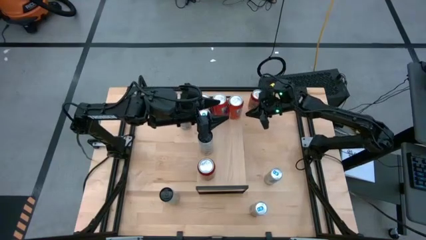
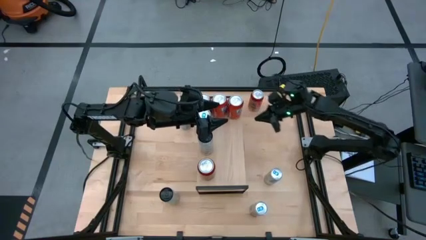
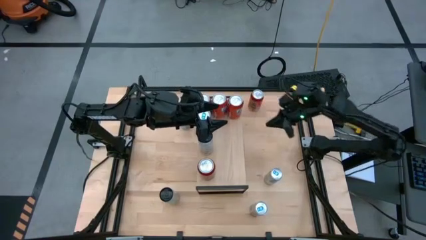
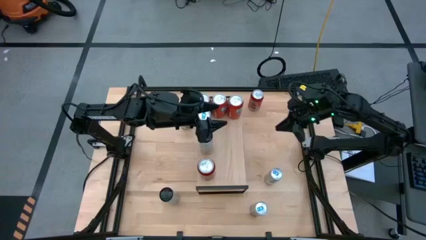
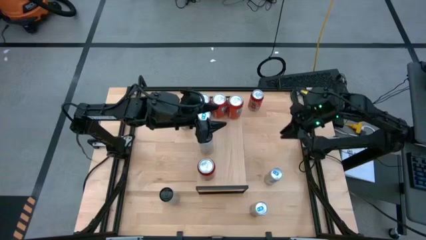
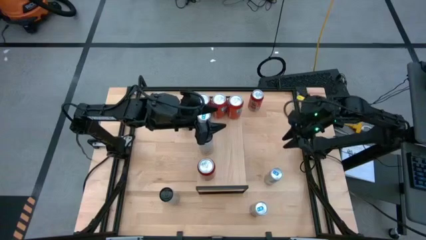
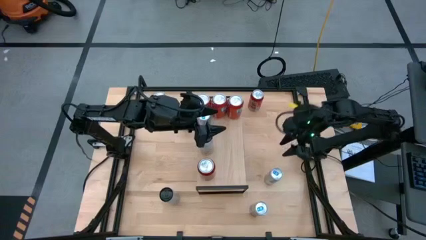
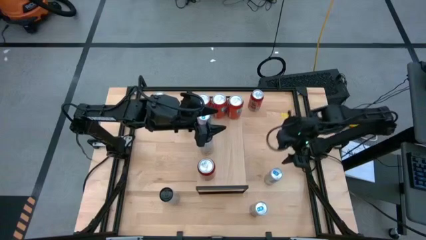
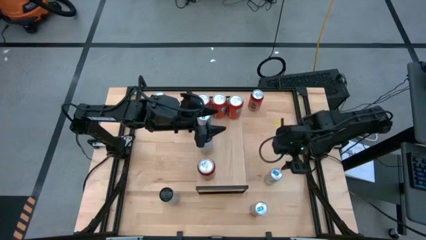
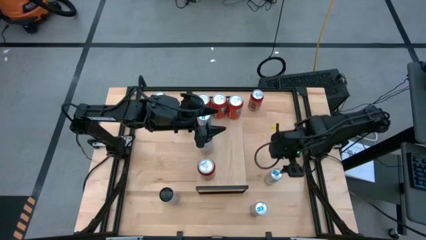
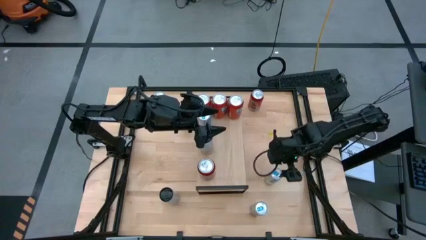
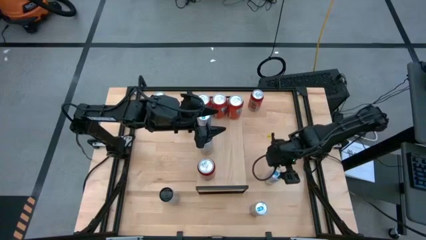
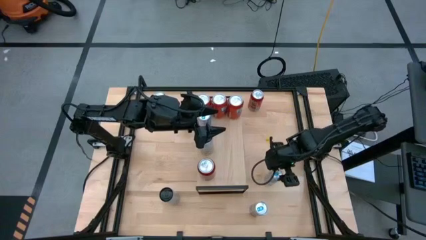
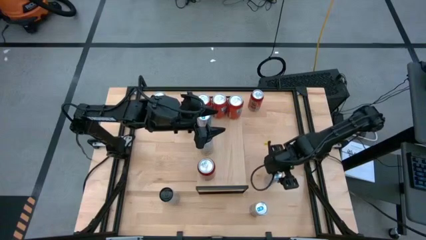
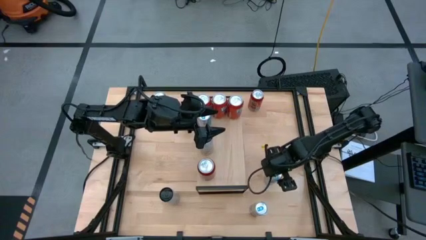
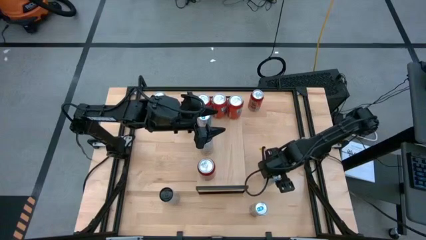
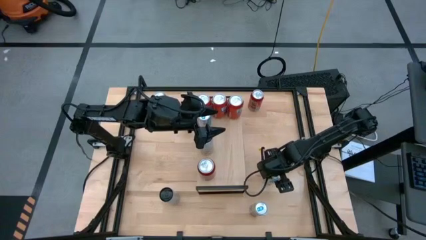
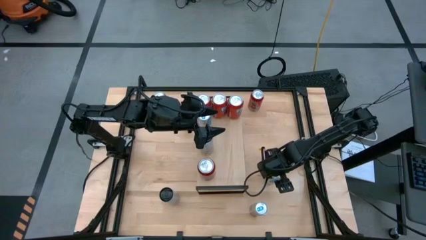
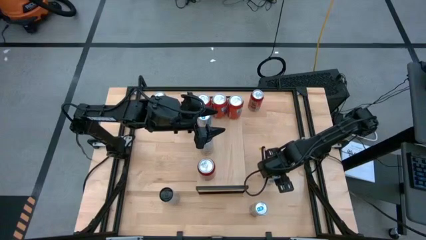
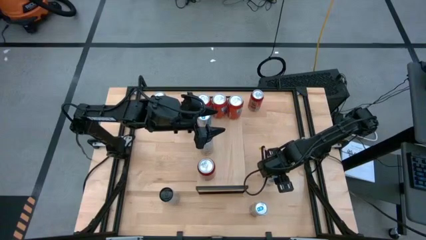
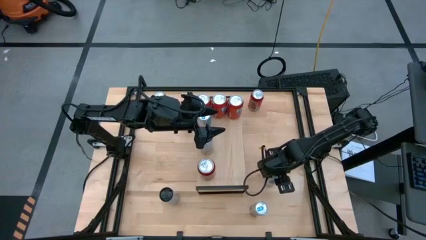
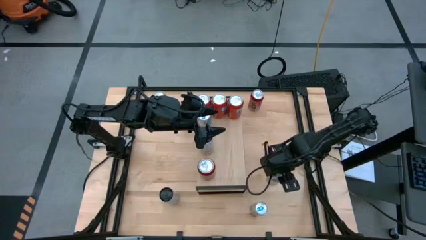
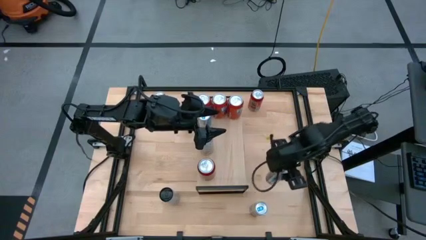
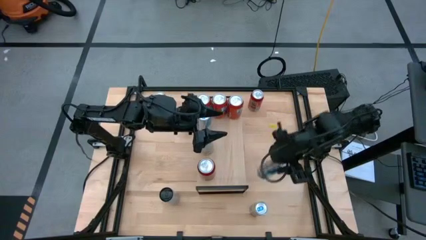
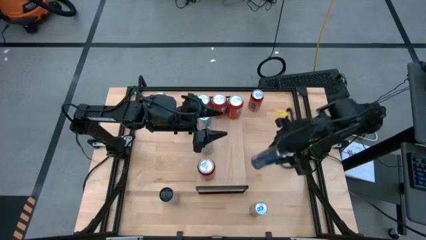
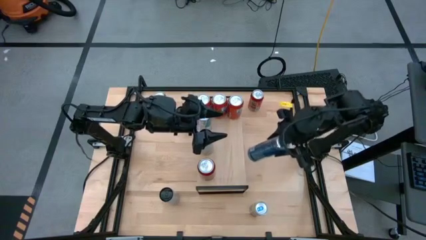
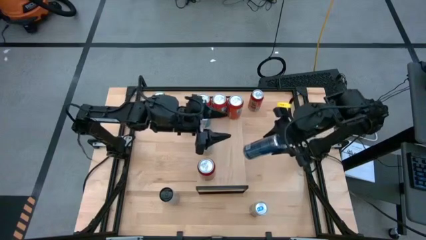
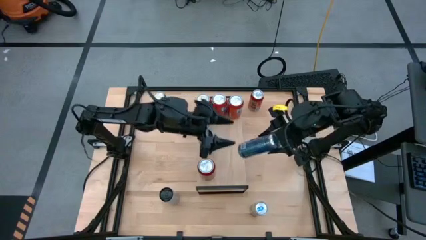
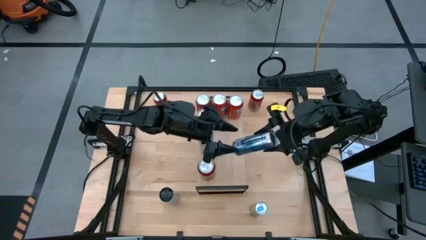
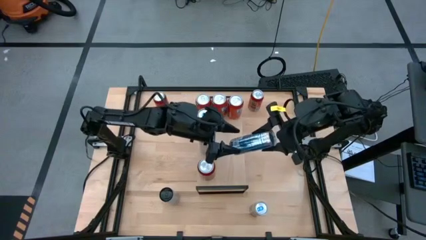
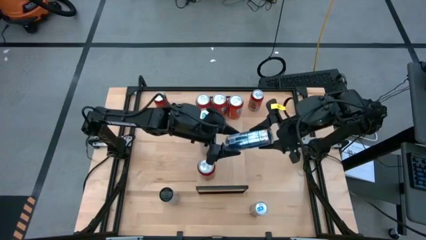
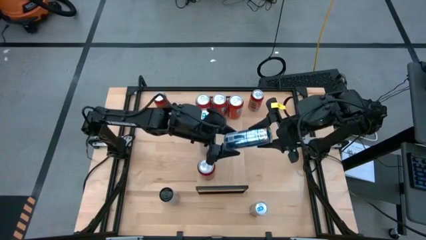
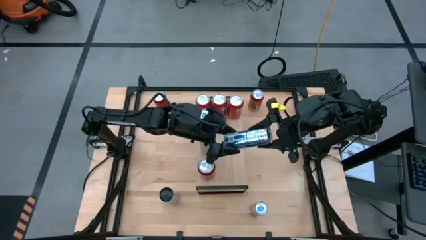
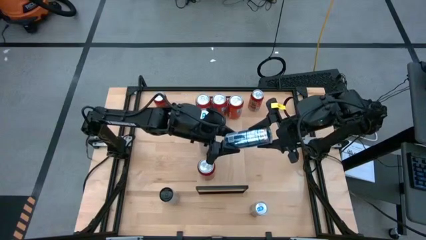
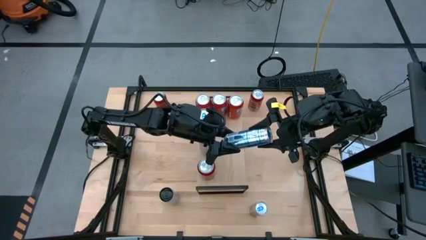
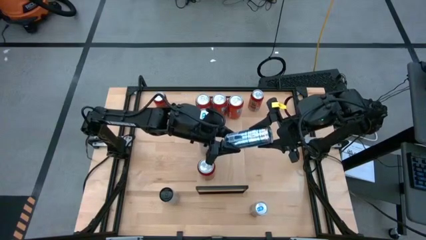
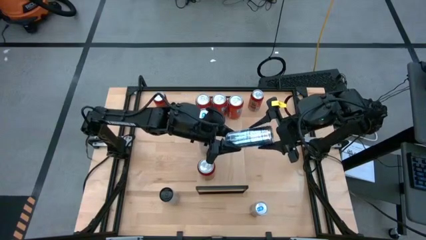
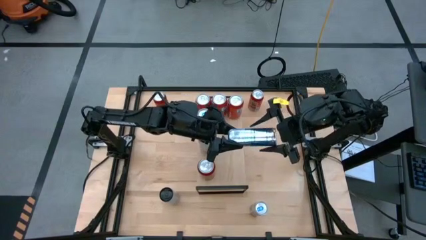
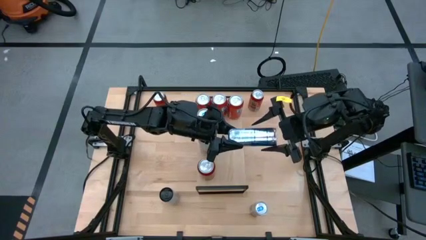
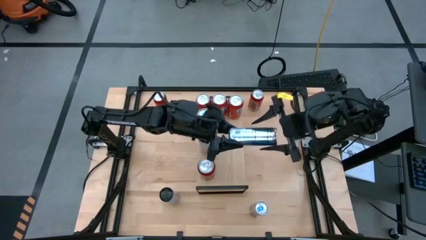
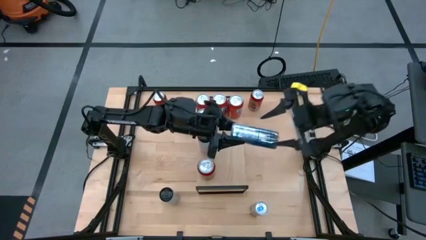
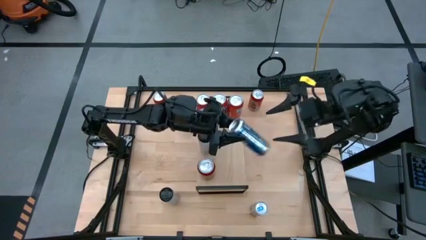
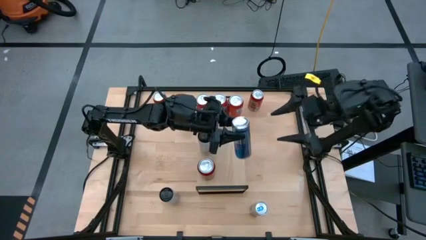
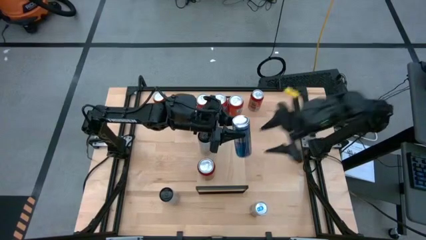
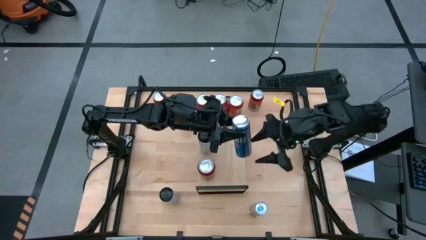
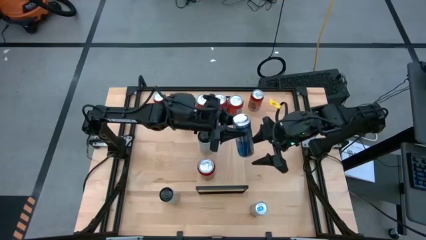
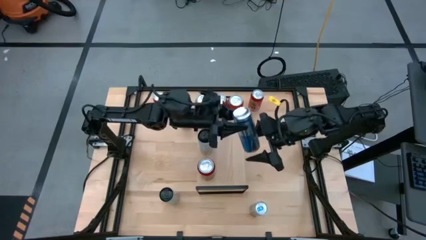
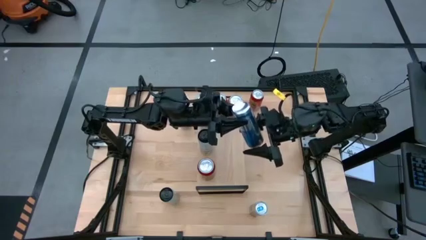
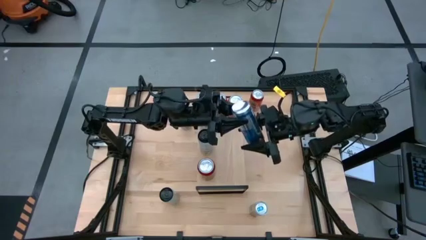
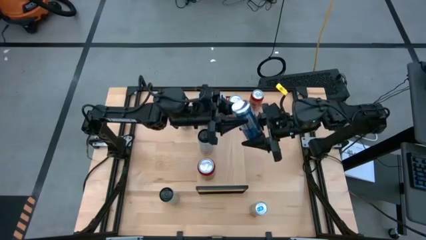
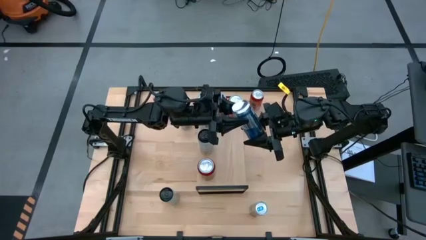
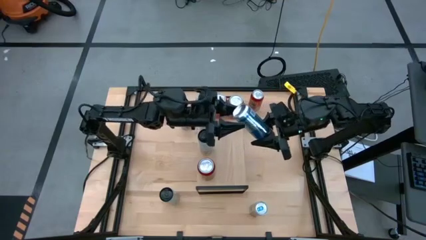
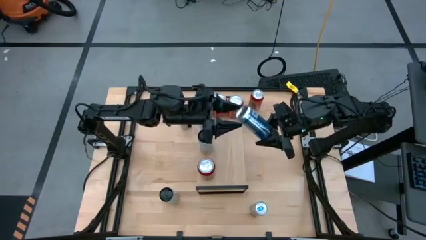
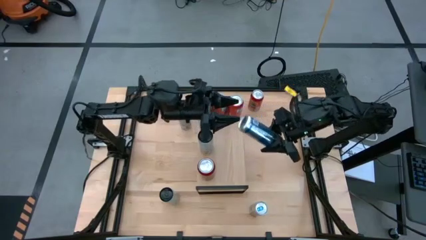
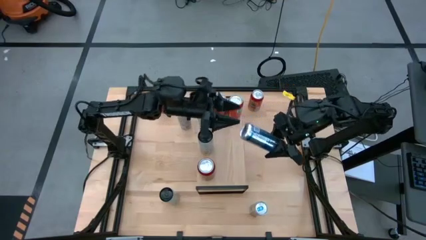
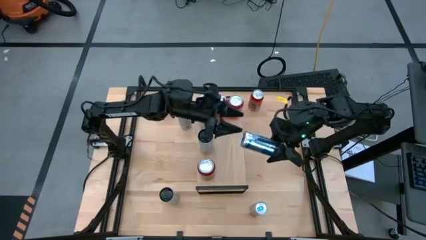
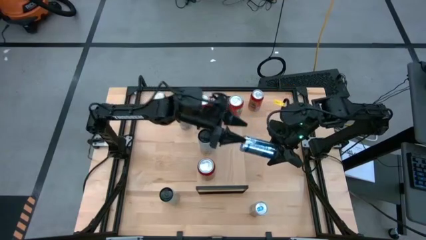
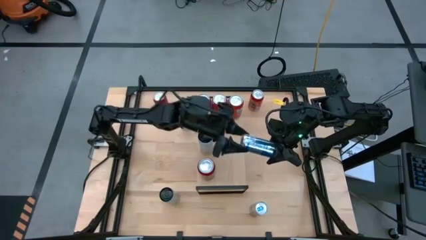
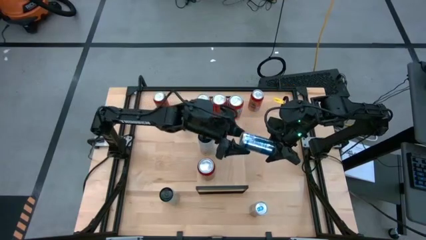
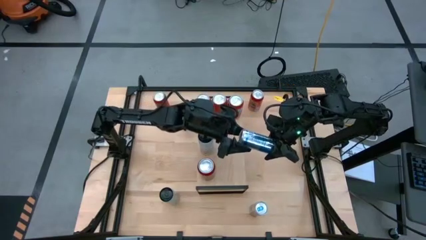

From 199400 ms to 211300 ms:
Task: Place canned beverage on shelf
Put the top blue soda can on the shelf aligned with the other blue soda can
